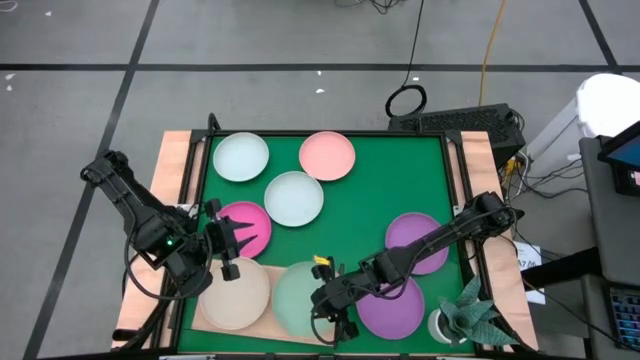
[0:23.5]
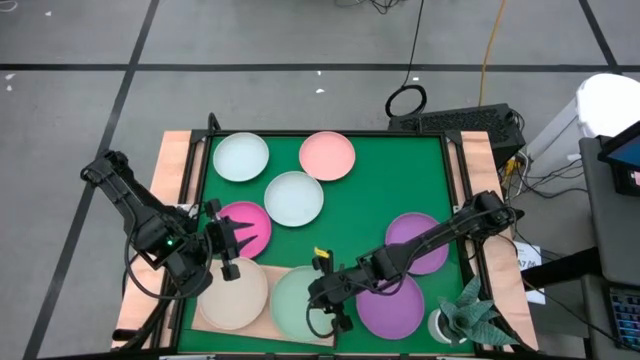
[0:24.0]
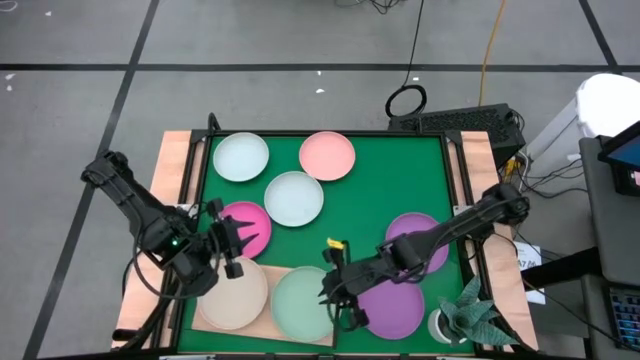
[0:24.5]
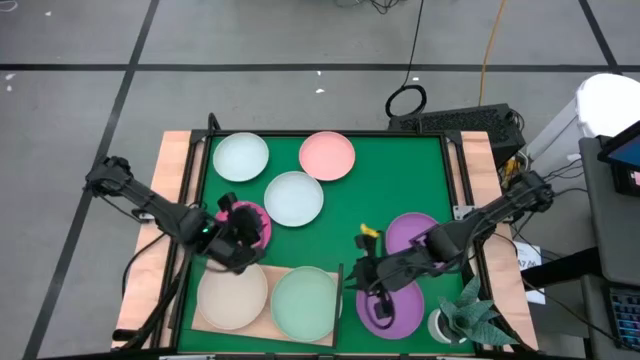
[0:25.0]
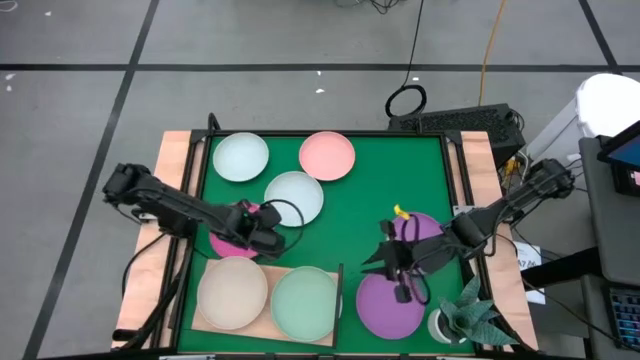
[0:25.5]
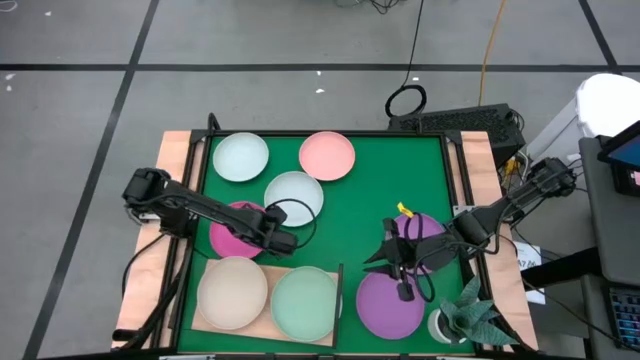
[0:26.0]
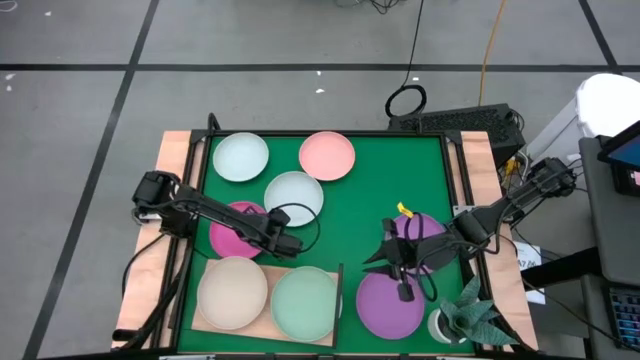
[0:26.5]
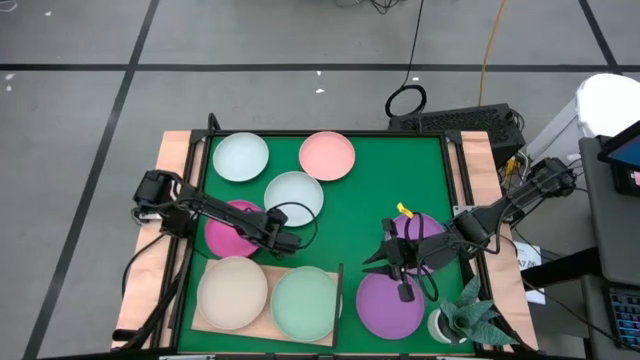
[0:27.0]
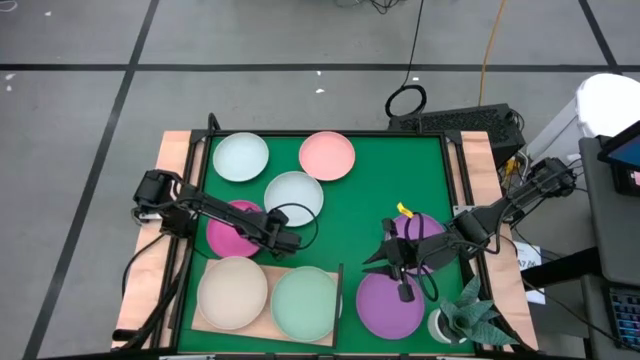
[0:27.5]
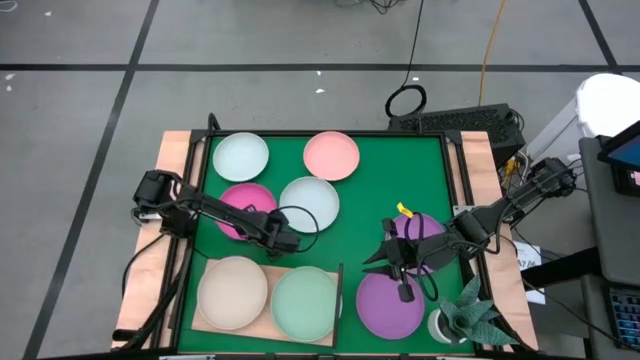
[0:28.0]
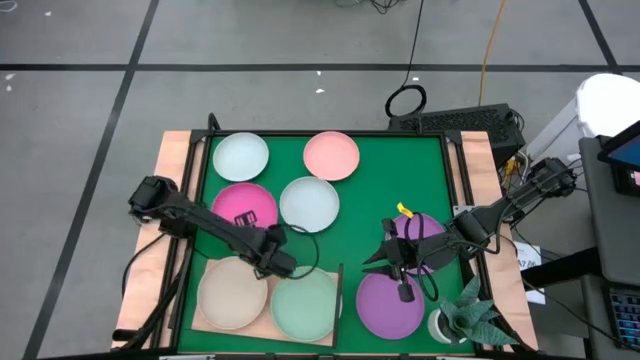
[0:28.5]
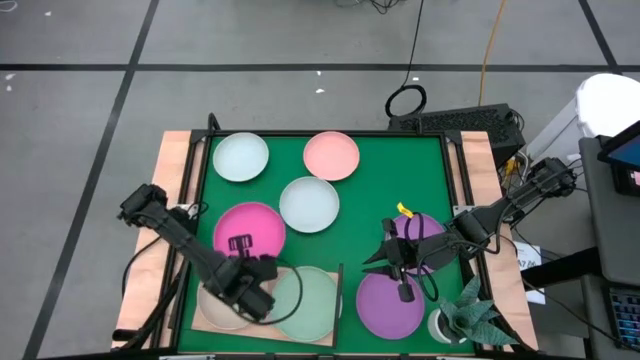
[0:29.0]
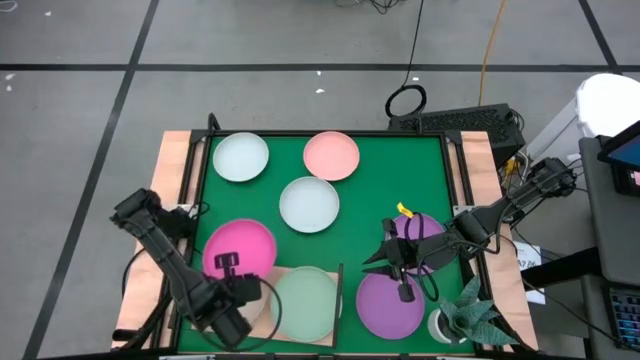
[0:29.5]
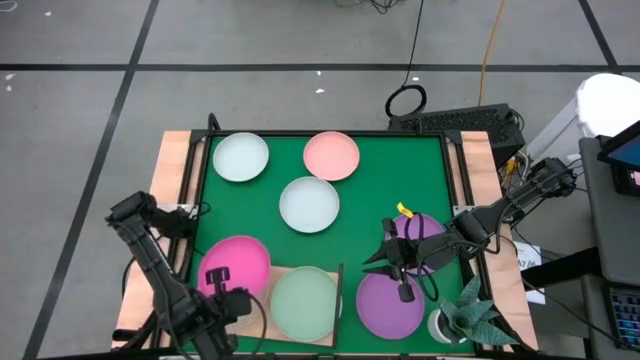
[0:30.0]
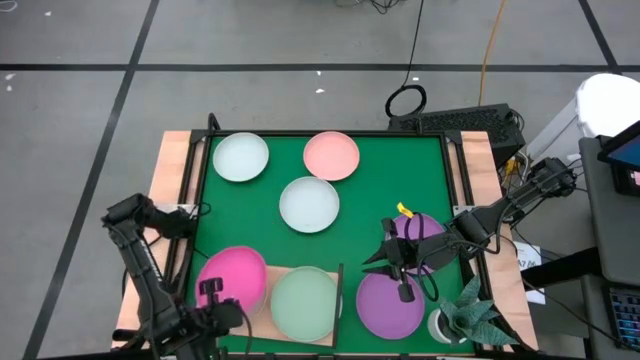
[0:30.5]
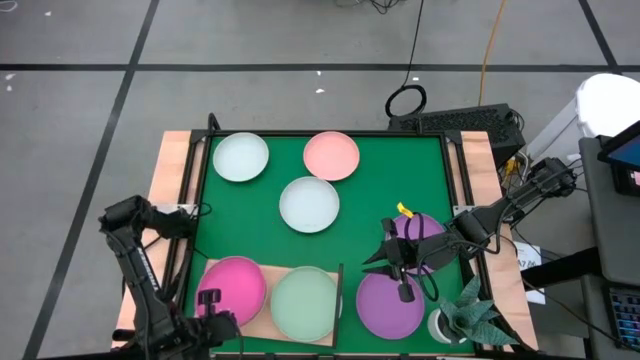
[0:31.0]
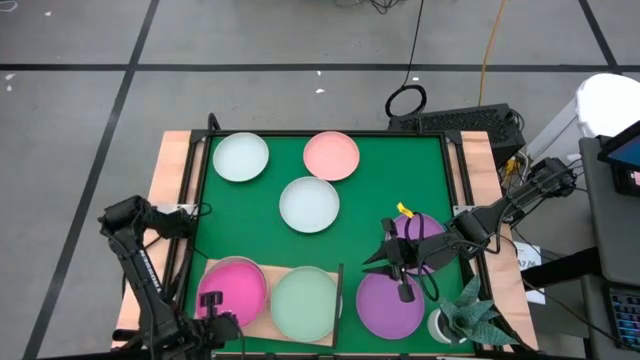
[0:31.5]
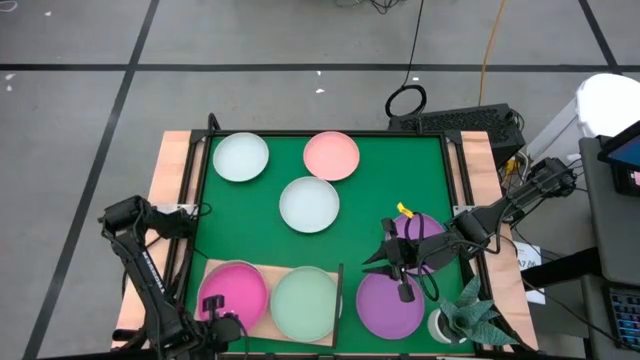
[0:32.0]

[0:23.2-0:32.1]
Task: Place and stack plates onto a shelf
Stack the pink plate on top of the brown plate on the shelf

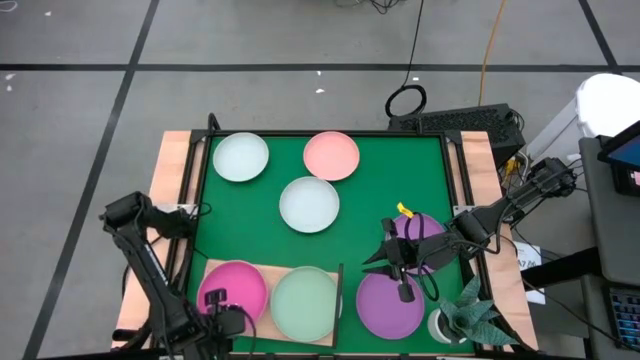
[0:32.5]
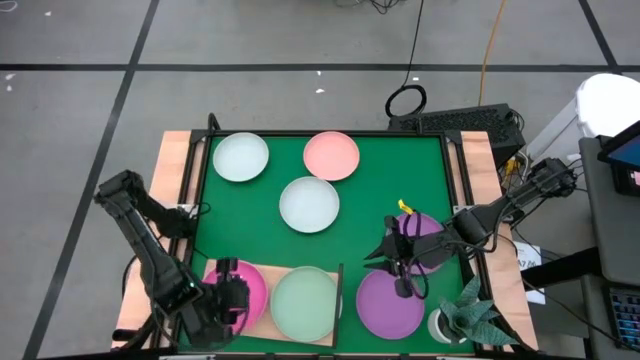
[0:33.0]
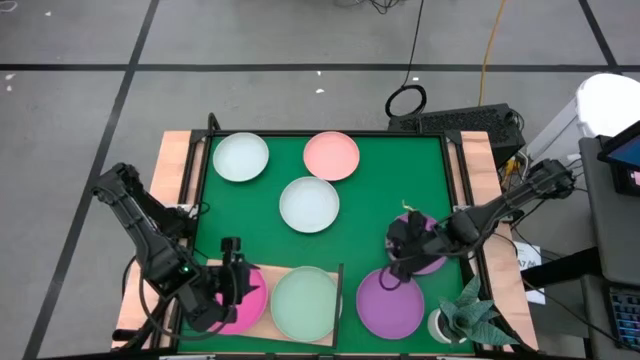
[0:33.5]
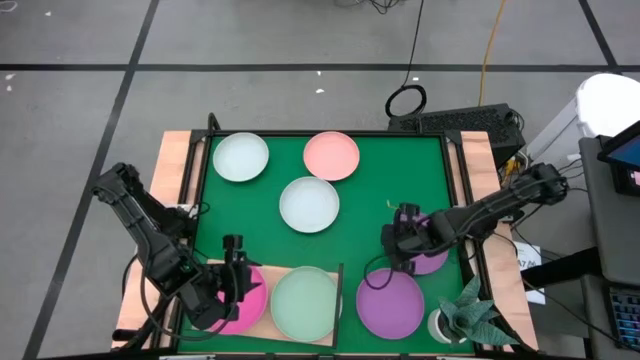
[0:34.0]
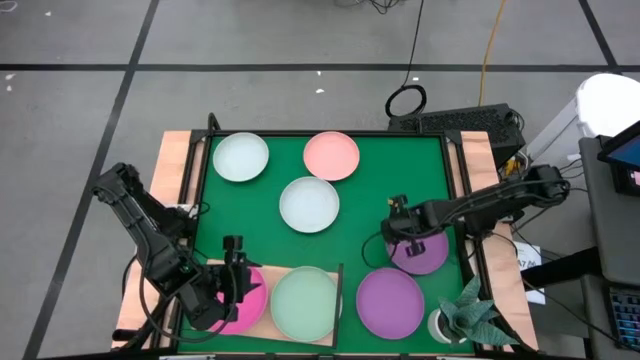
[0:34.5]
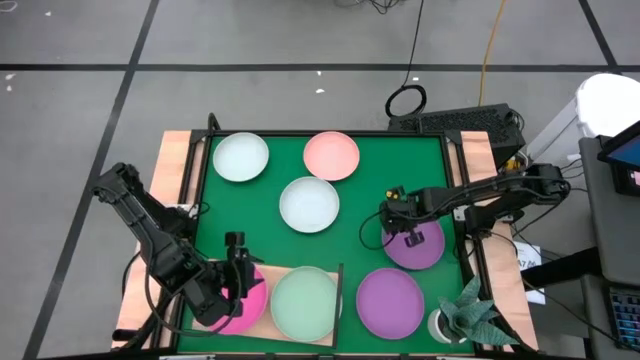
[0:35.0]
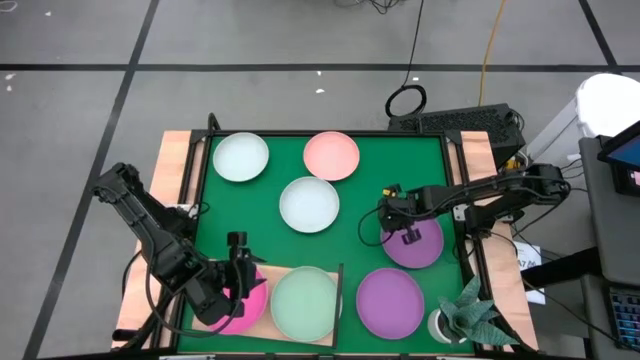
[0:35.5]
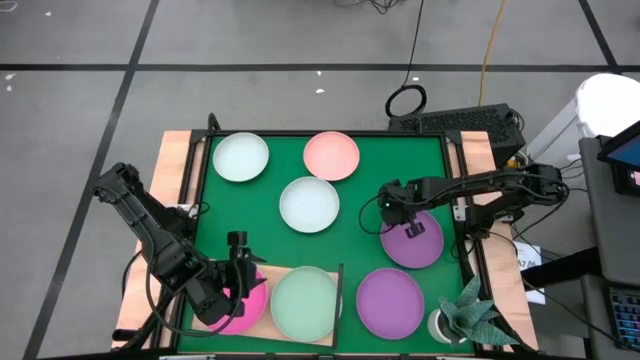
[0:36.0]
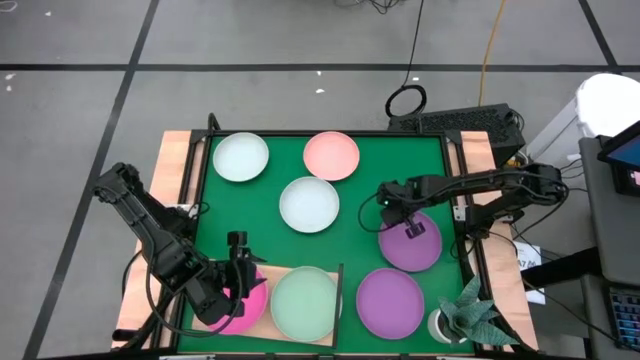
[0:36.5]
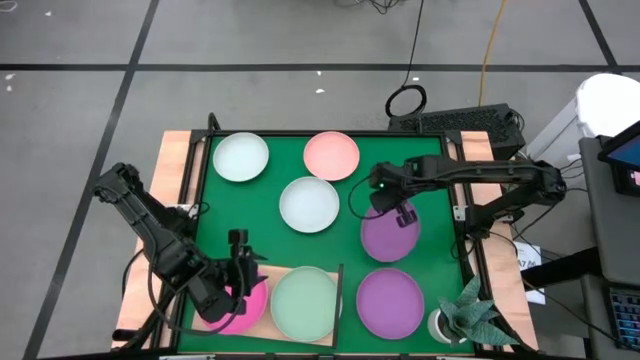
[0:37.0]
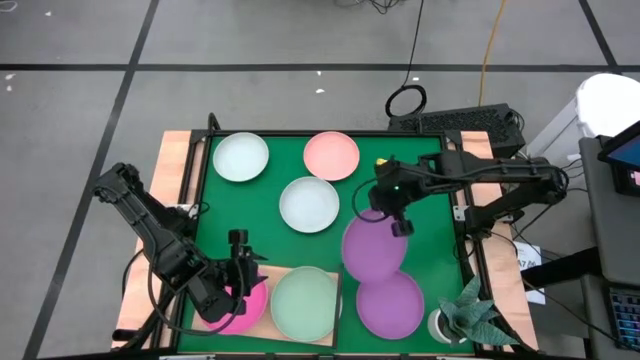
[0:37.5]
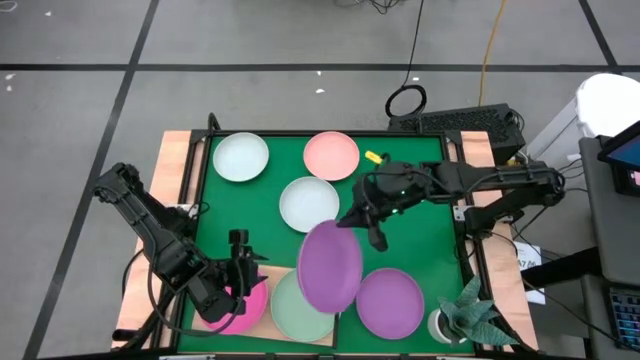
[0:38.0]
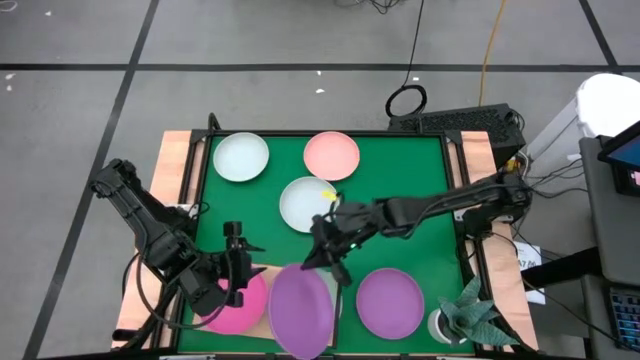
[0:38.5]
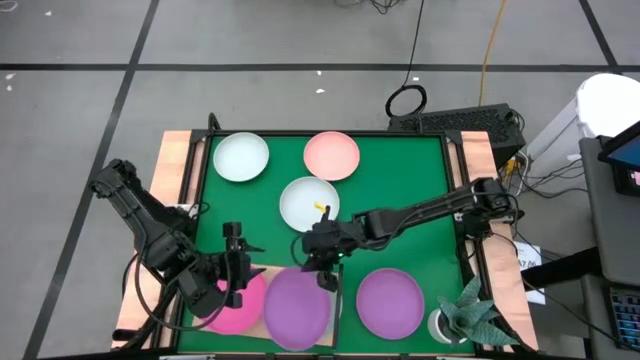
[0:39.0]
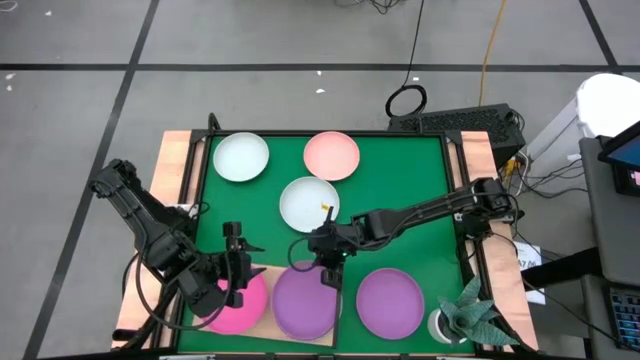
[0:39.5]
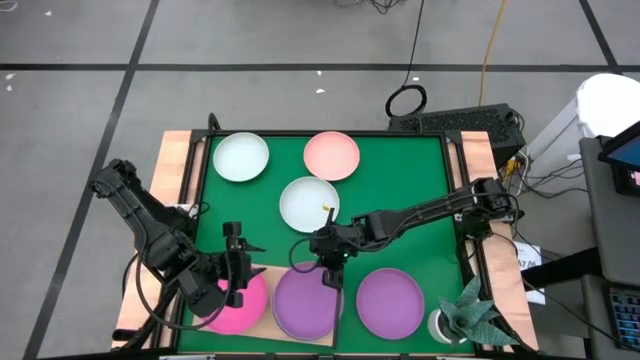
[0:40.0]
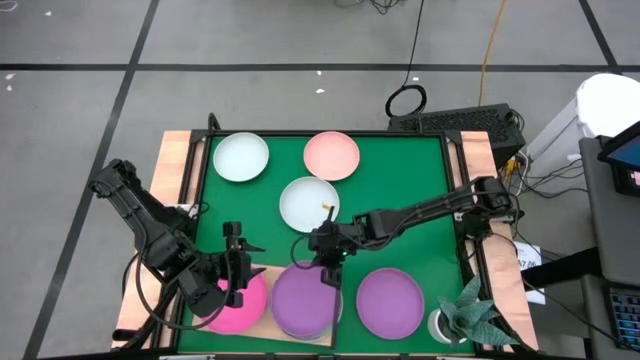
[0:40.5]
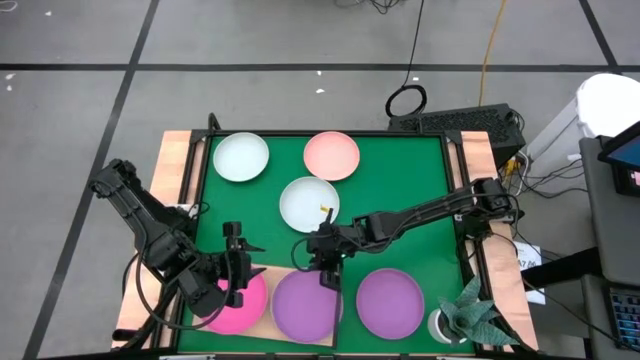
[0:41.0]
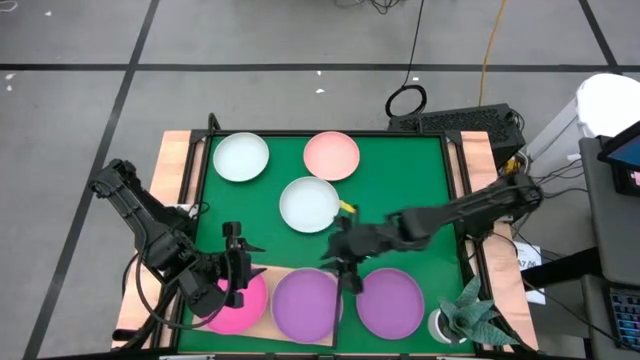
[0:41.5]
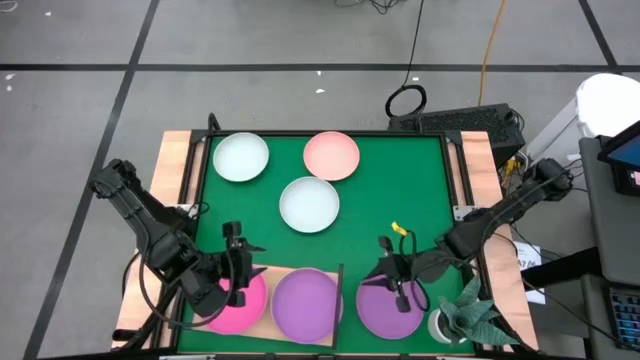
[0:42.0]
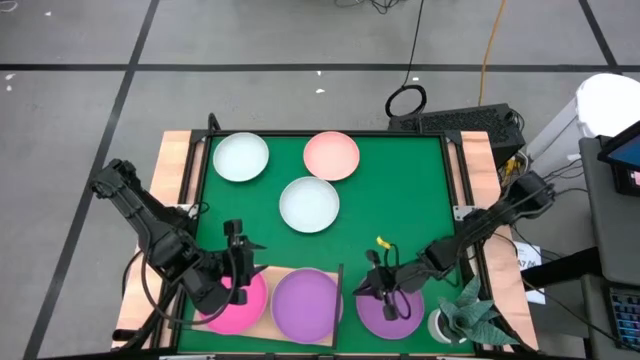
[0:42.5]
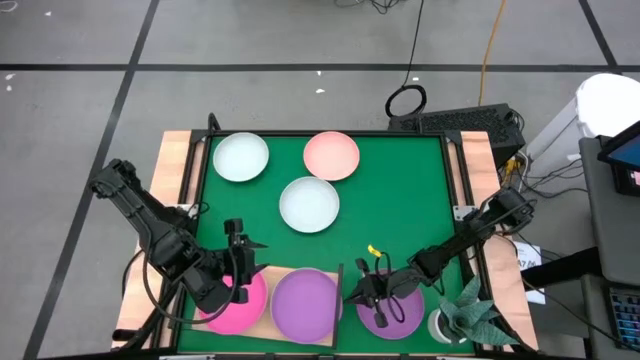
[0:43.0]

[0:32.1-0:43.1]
Stack the top purple plate on top of the green plate on the shelf
